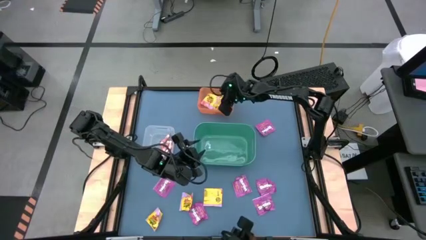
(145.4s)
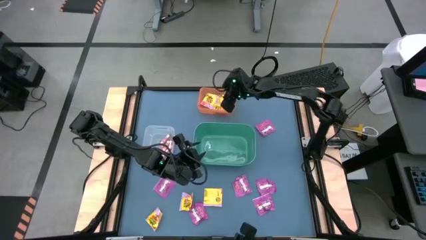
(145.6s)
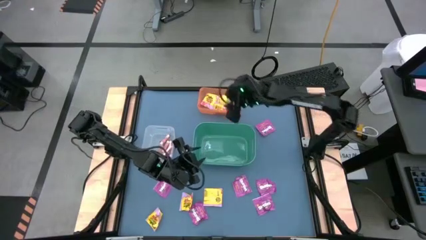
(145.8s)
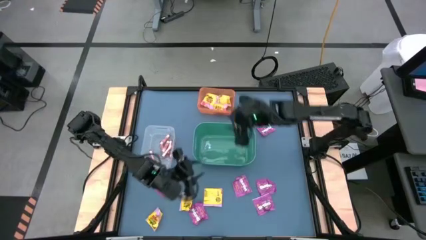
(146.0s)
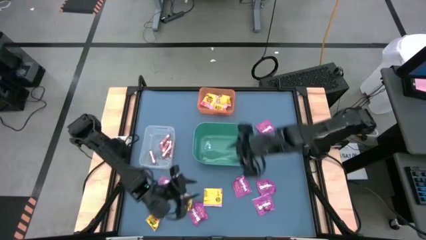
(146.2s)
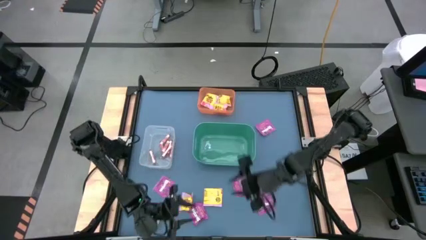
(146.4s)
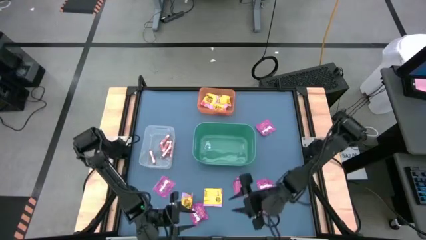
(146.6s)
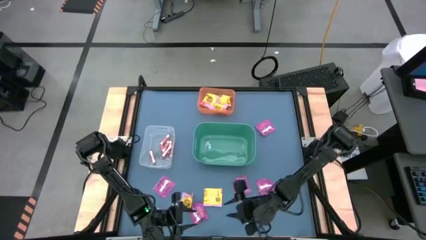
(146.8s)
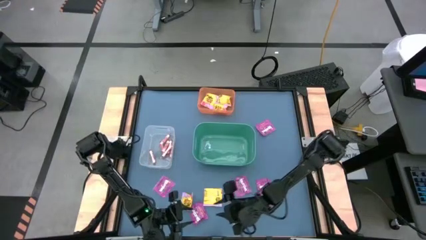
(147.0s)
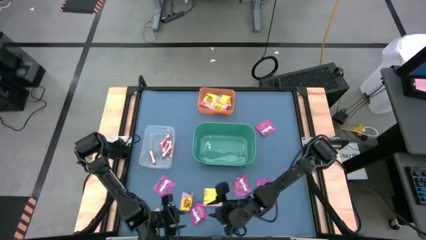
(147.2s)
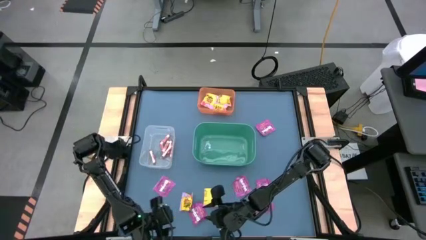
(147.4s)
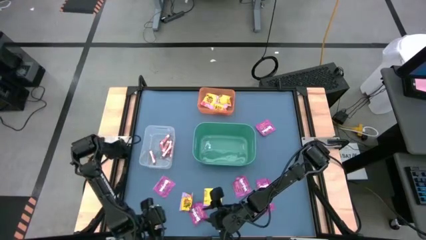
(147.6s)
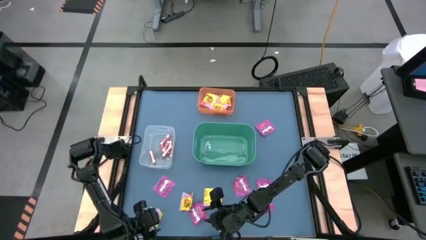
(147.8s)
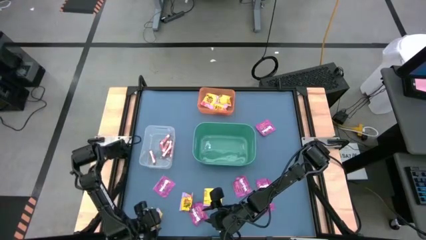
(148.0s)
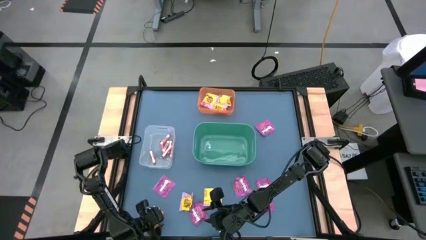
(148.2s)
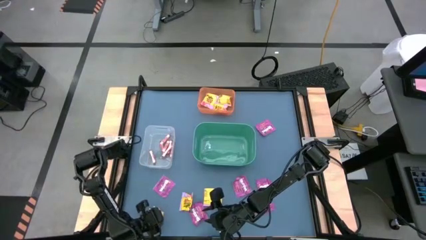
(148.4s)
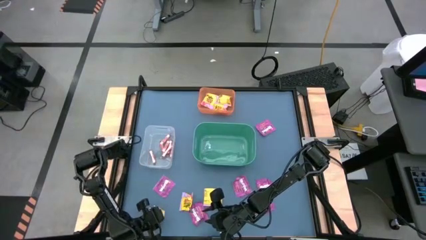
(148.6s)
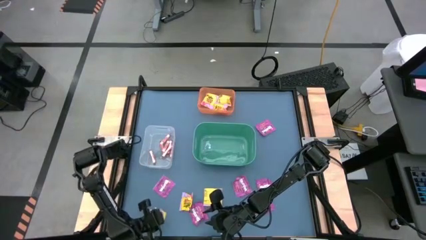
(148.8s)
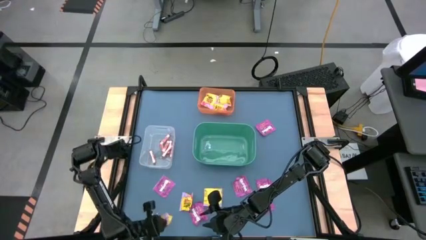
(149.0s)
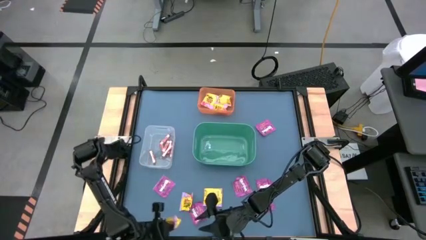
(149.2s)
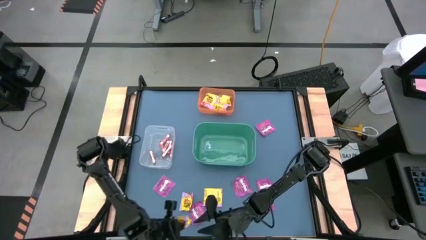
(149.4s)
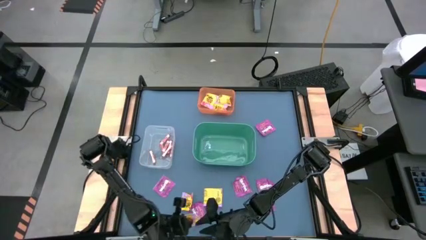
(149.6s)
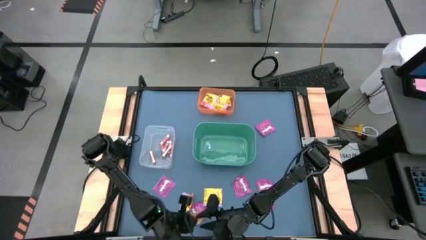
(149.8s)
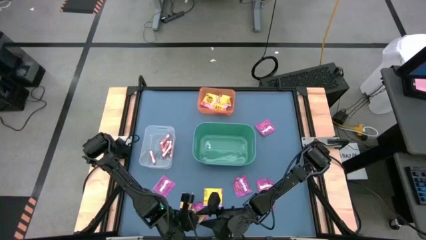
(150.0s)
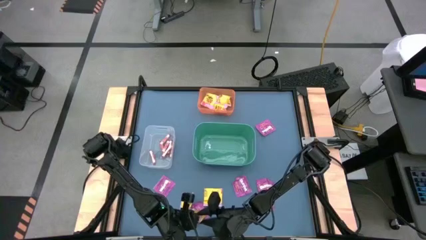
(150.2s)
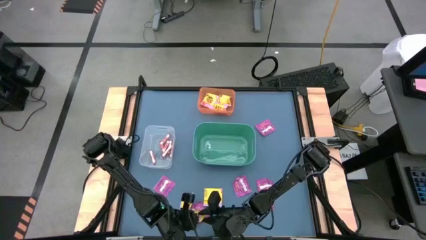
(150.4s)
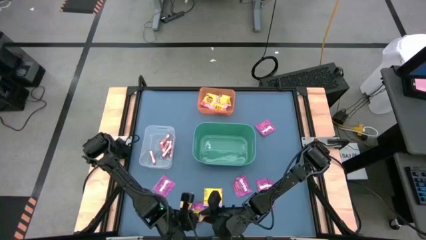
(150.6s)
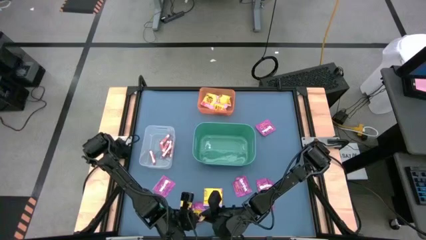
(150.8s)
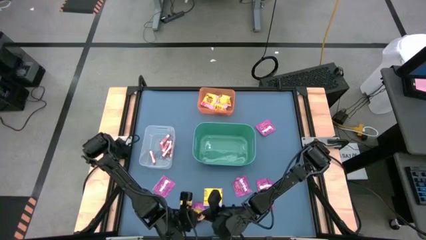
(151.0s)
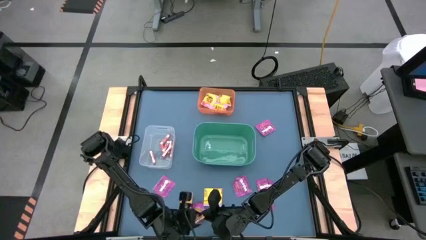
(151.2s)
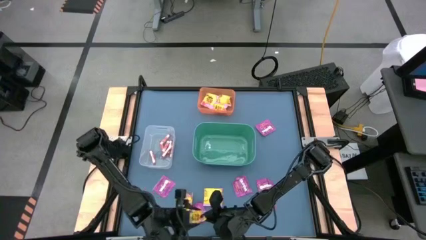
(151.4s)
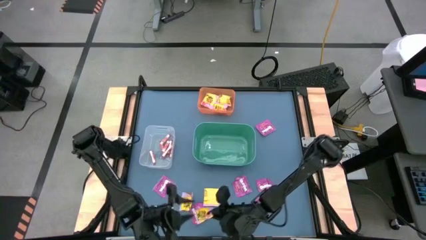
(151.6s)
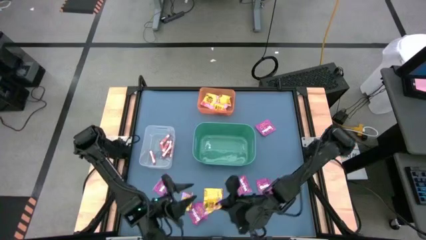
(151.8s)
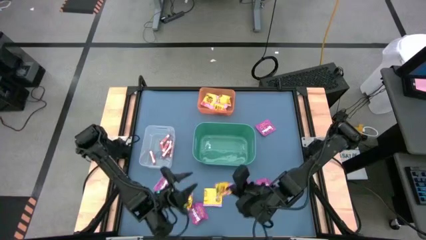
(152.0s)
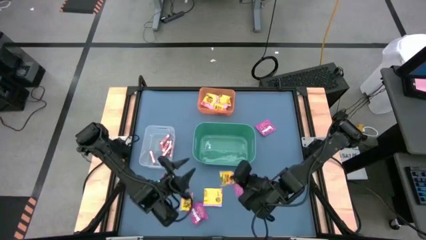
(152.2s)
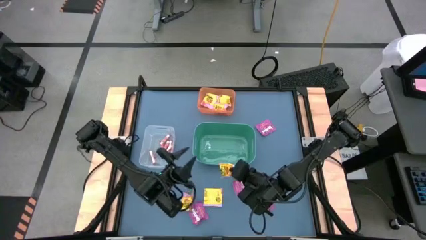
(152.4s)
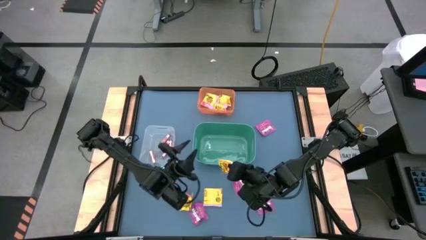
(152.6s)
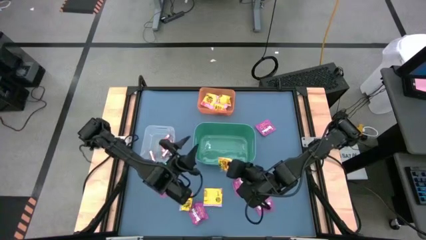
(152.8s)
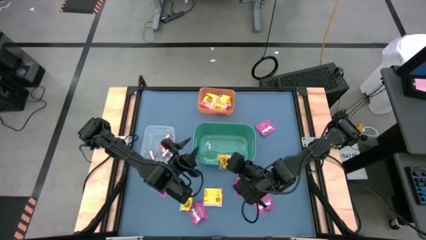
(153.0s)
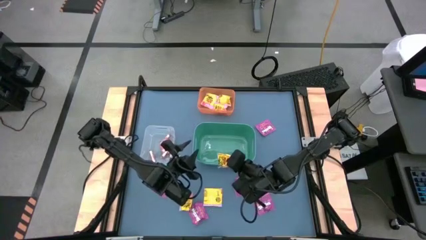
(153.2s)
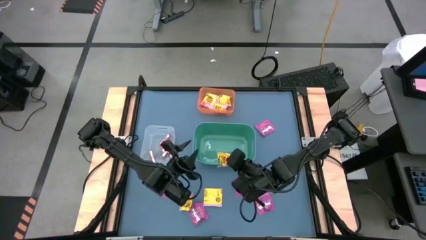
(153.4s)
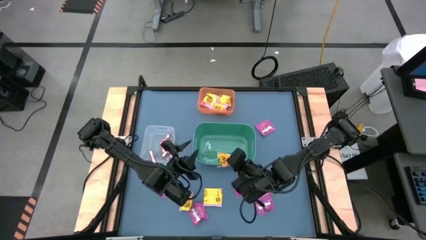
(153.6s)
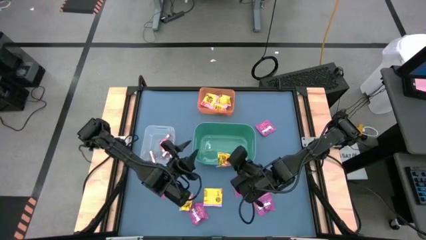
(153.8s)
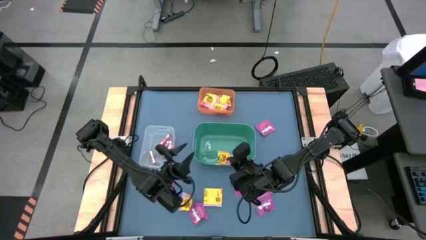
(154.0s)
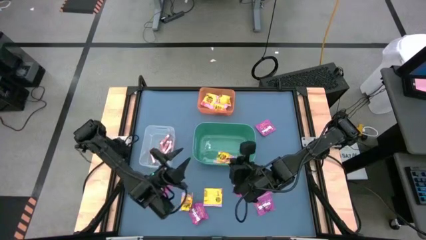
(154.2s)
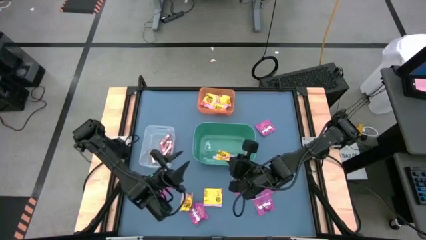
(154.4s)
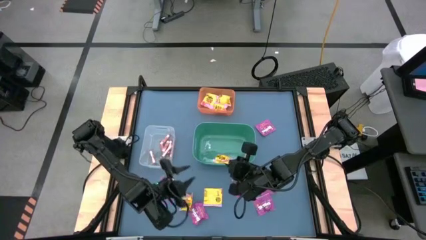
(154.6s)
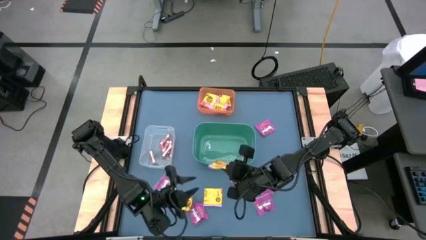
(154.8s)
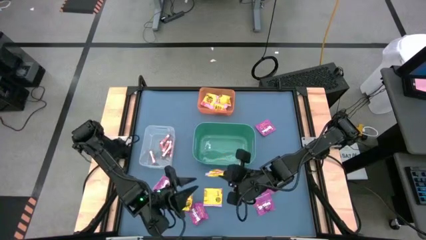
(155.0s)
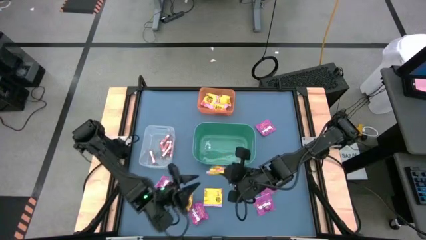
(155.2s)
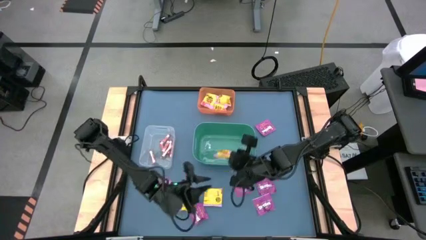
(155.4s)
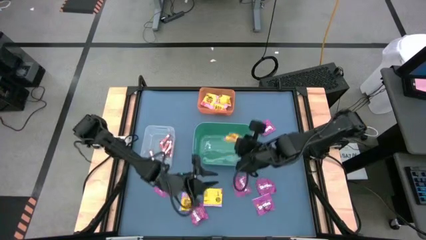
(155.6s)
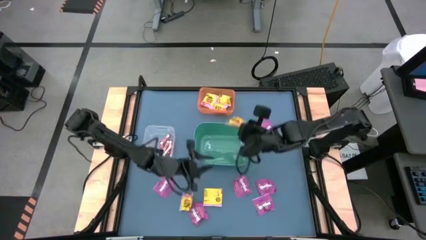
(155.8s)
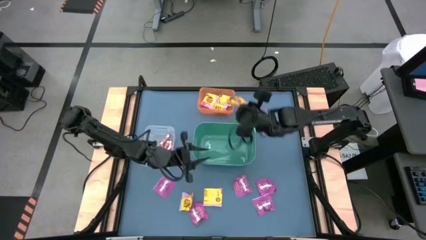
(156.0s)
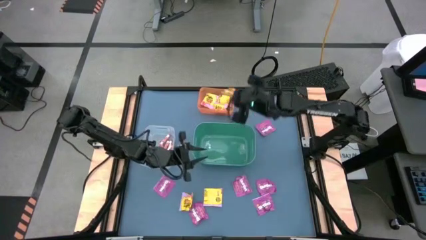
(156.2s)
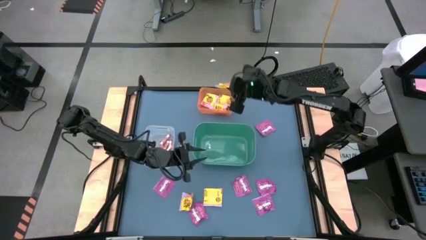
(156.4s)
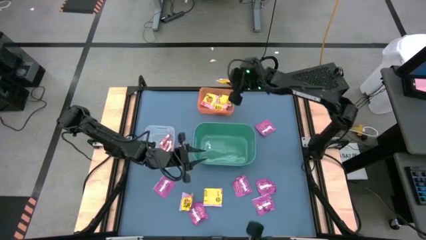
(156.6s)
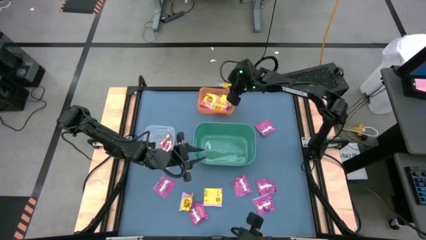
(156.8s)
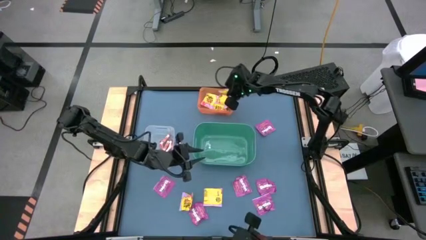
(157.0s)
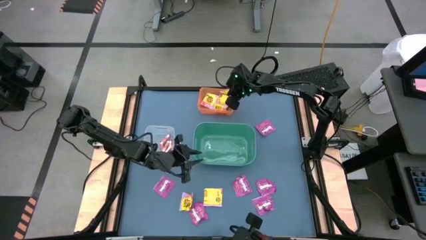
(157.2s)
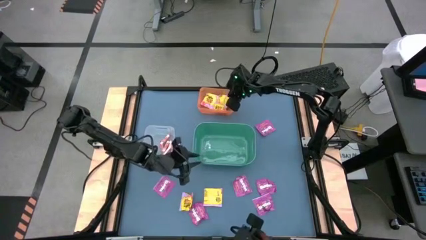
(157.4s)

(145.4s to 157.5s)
Task: Sort candy
Put the yellow candy into the orange bin

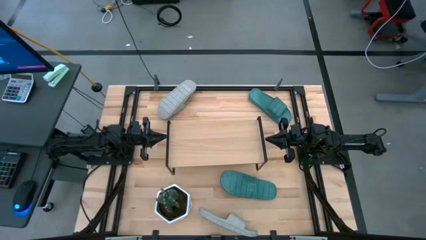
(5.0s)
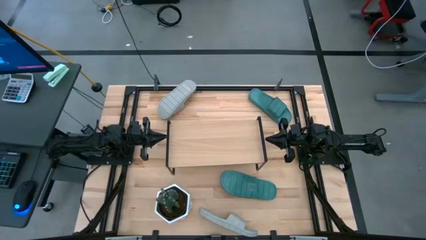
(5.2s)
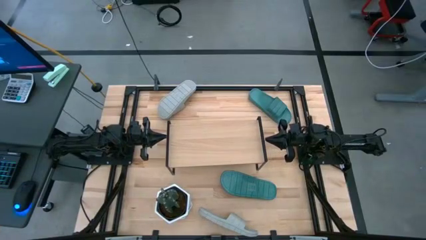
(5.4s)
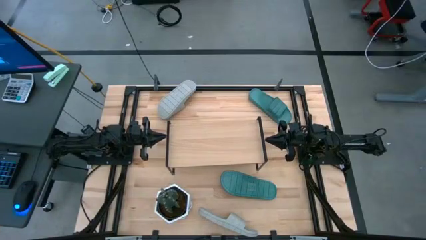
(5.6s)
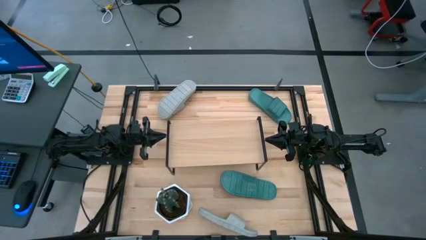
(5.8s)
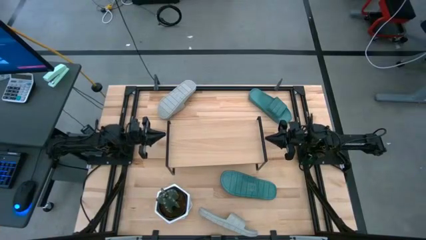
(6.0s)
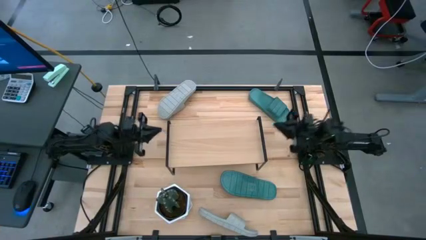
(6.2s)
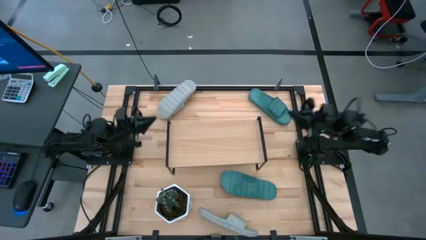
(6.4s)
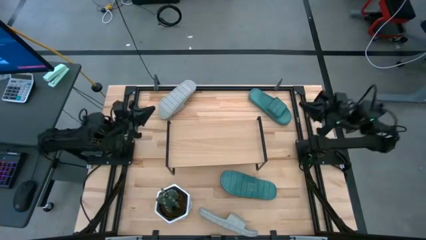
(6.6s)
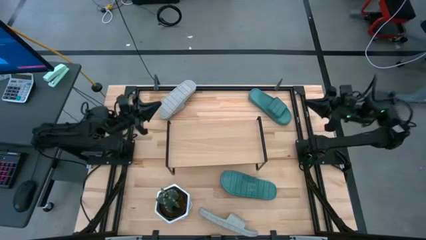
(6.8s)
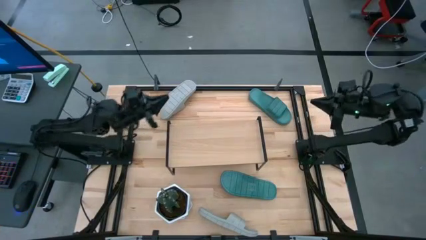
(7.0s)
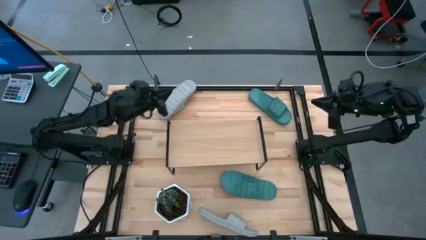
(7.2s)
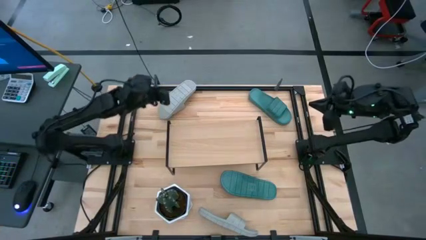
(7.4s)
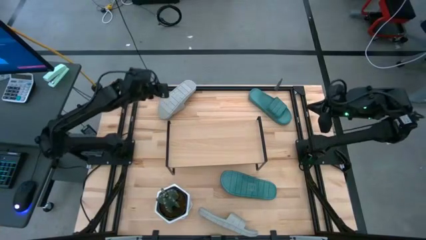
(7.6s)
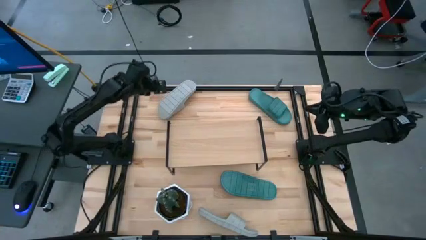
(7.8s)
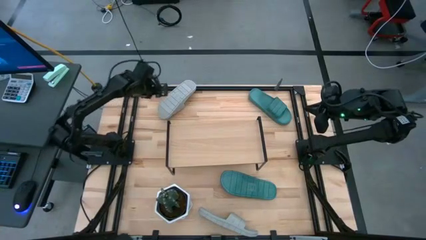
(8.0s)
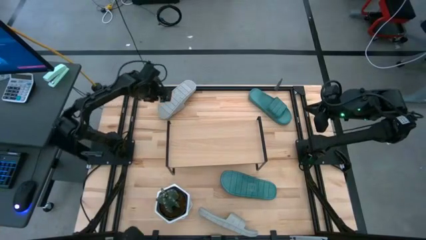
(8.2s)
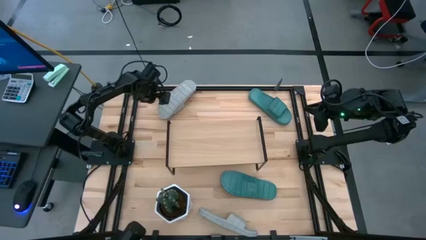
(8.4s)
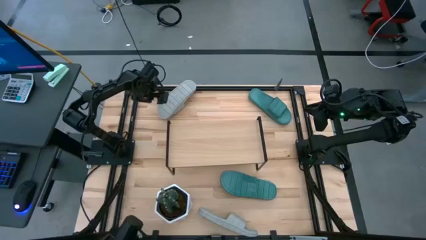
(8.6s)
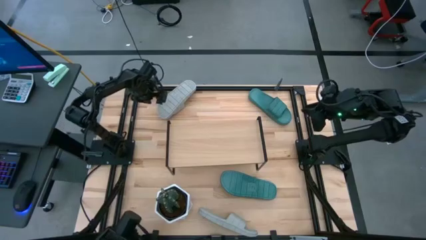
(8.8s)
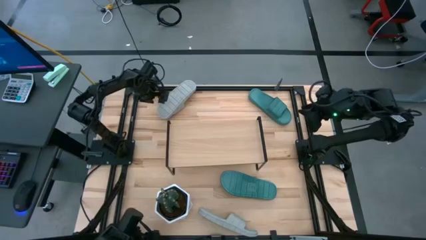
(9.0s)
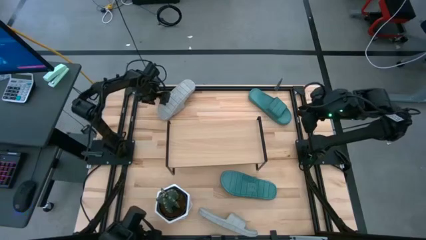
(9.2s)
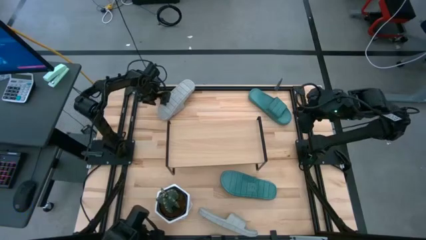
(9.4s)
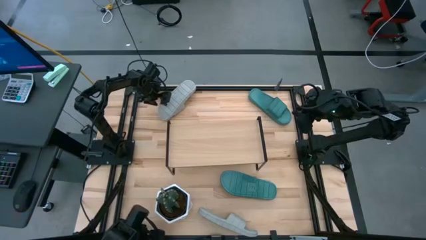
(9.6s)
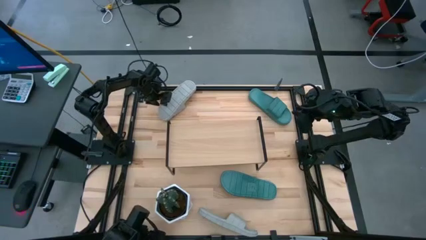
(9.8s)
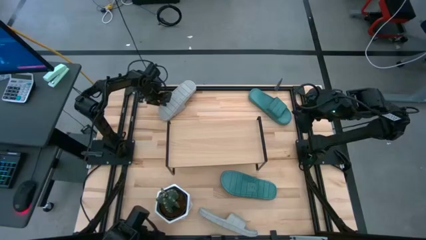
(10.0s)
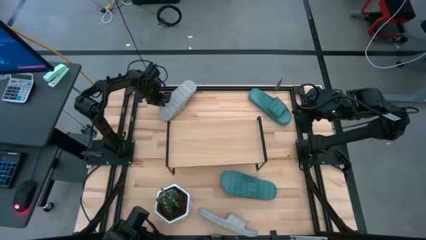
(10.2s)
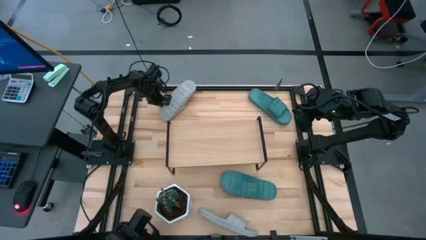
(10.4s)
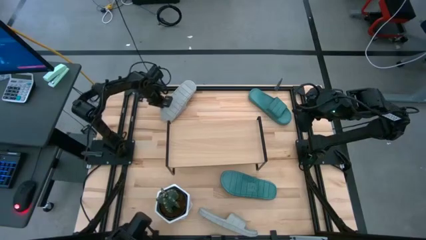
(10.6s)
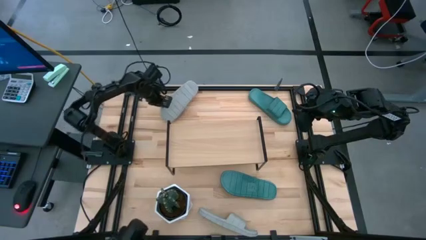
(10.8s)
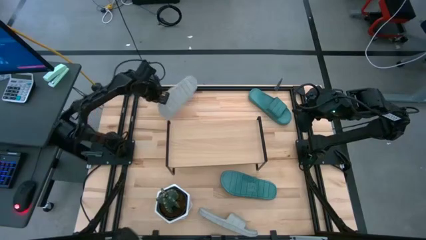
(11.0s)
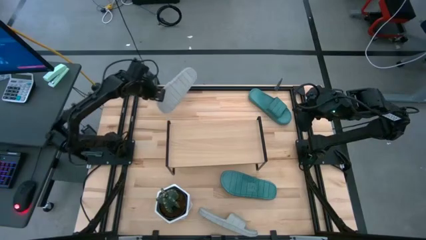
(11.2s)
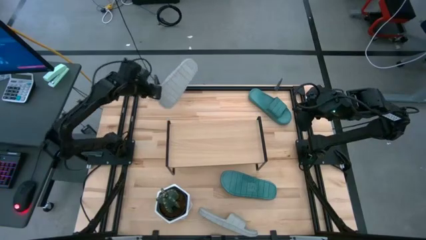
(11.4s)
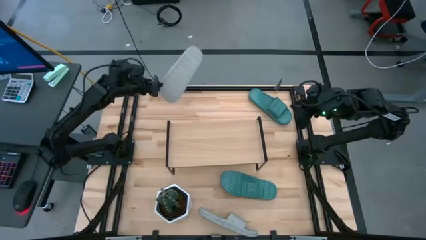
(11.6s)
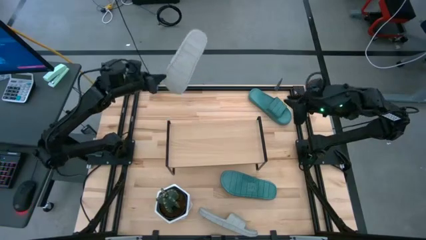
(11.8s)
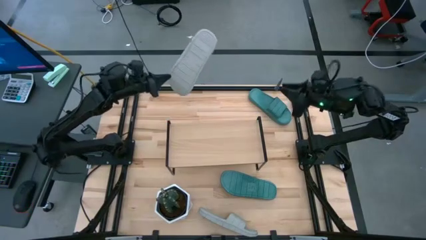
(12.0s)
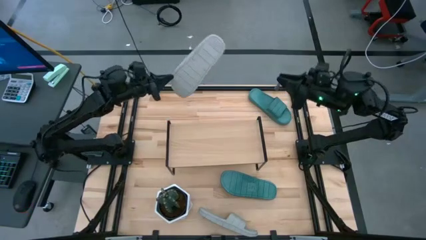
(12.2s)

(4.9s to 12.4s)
Task: Pick and place slides into the shelf
Put the top gray slide on the shelf
